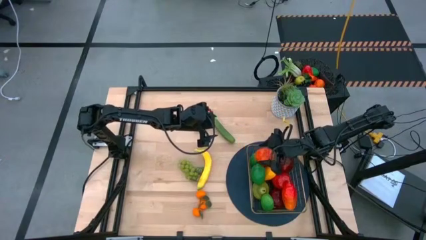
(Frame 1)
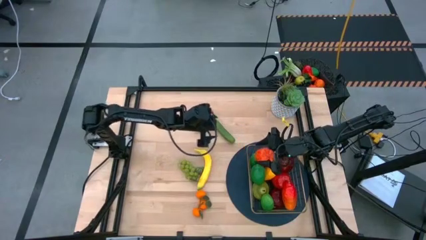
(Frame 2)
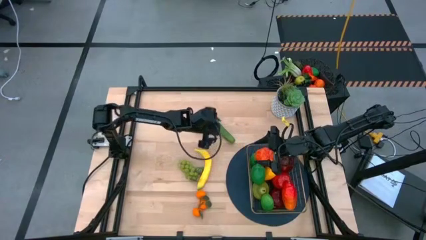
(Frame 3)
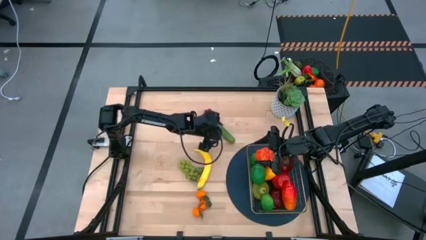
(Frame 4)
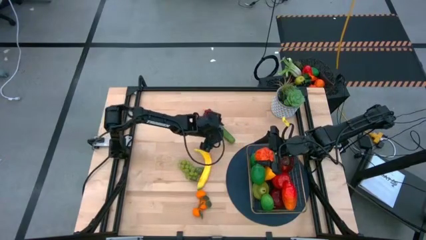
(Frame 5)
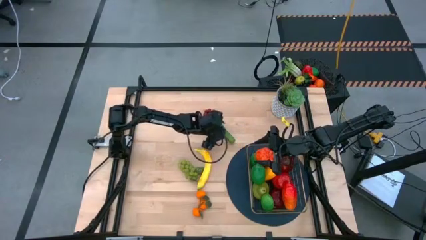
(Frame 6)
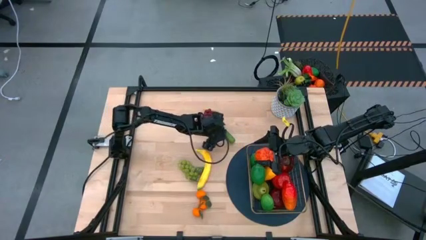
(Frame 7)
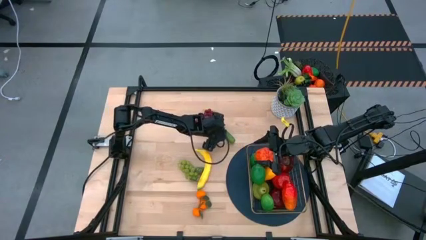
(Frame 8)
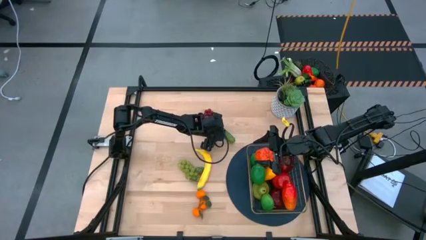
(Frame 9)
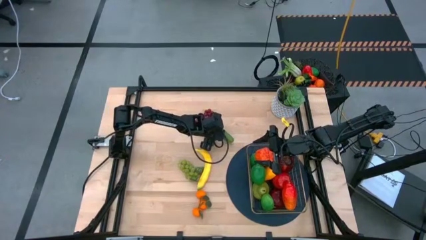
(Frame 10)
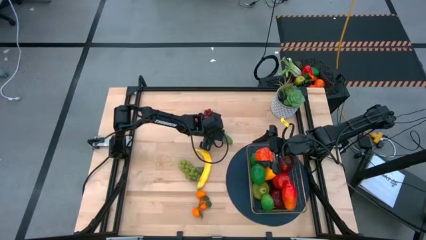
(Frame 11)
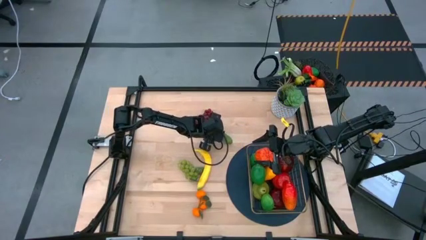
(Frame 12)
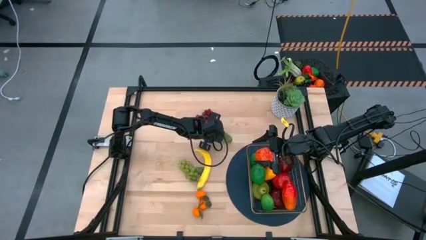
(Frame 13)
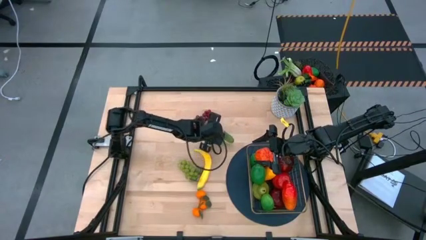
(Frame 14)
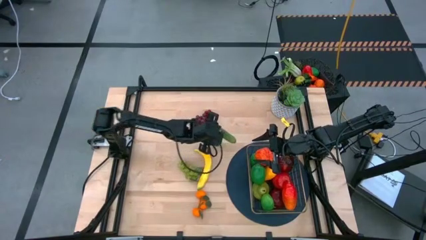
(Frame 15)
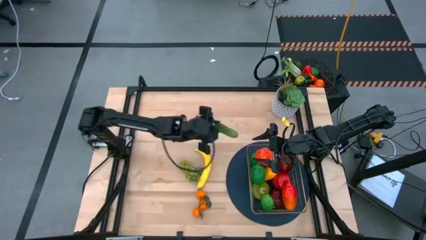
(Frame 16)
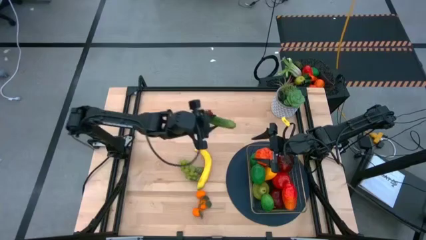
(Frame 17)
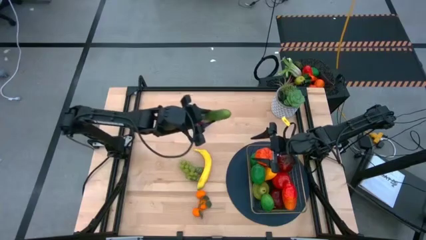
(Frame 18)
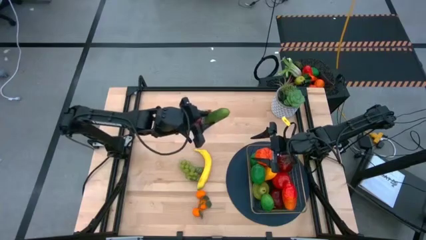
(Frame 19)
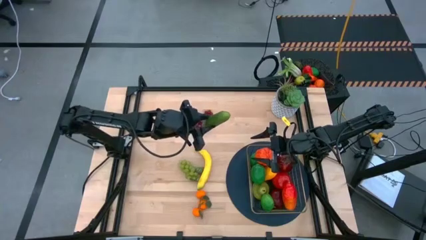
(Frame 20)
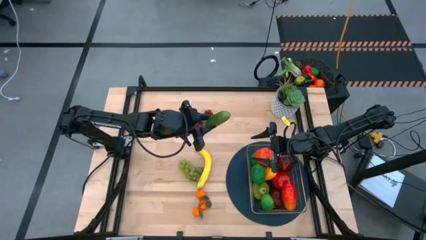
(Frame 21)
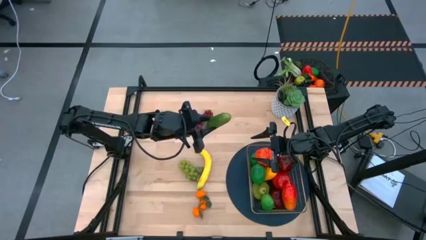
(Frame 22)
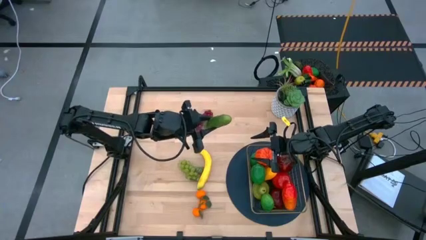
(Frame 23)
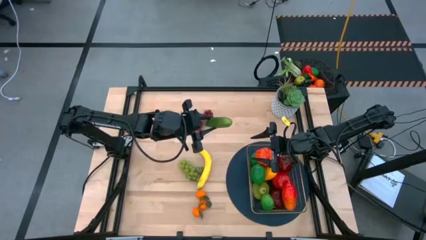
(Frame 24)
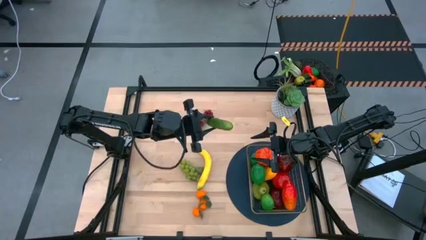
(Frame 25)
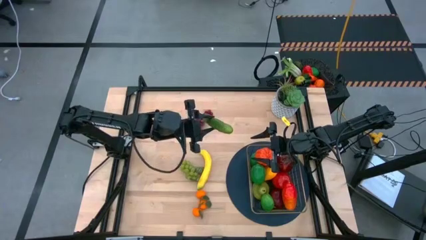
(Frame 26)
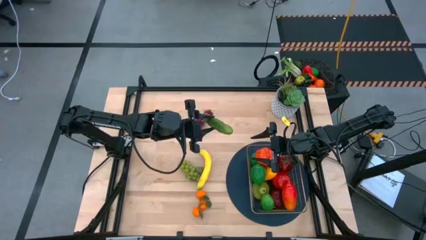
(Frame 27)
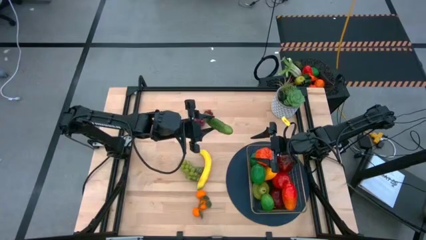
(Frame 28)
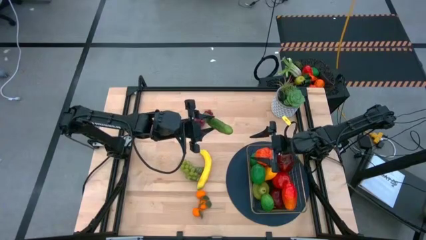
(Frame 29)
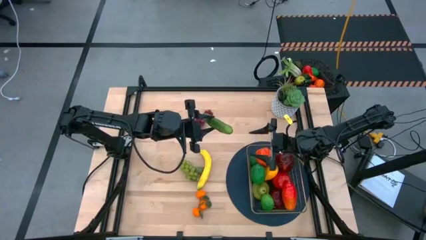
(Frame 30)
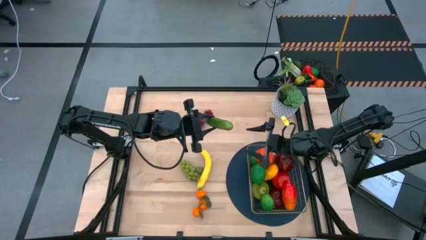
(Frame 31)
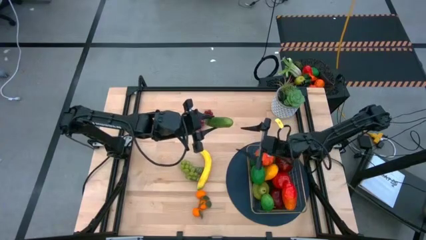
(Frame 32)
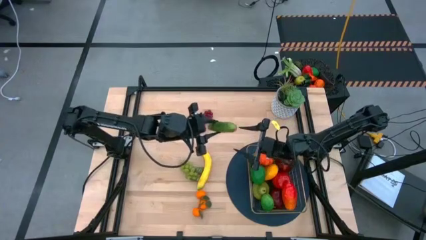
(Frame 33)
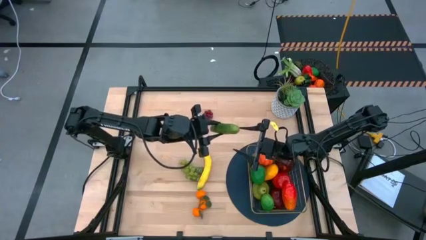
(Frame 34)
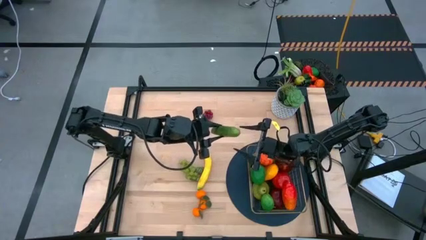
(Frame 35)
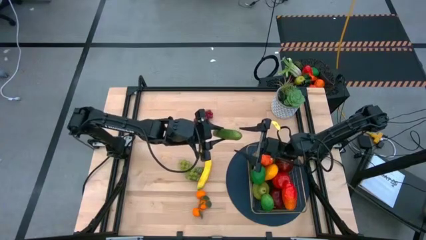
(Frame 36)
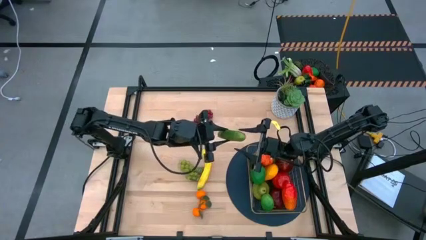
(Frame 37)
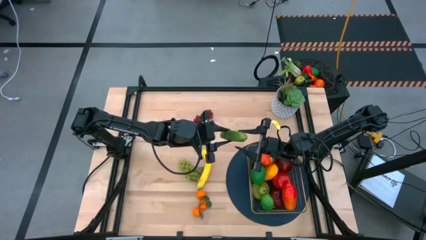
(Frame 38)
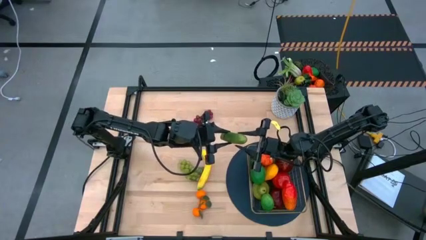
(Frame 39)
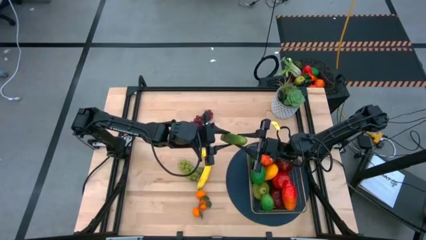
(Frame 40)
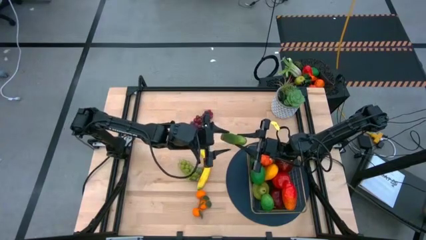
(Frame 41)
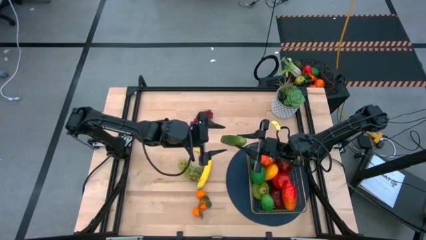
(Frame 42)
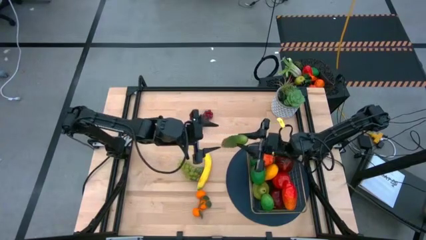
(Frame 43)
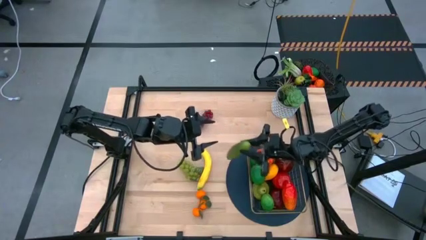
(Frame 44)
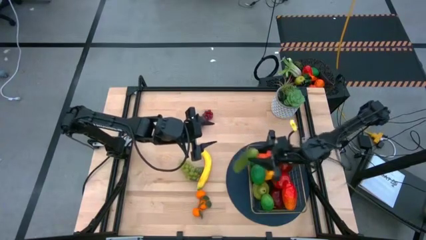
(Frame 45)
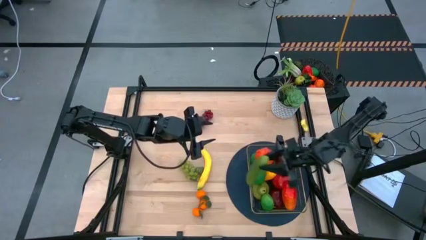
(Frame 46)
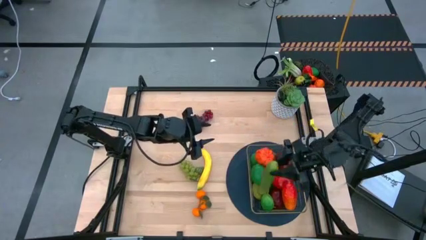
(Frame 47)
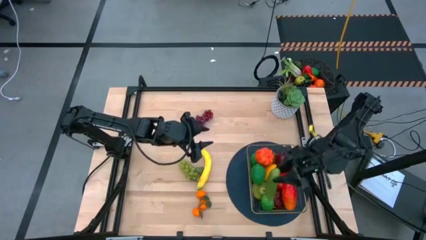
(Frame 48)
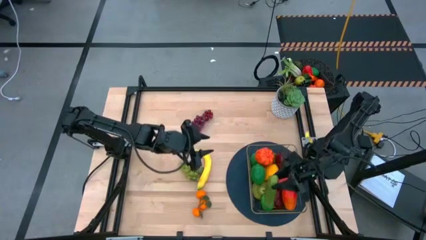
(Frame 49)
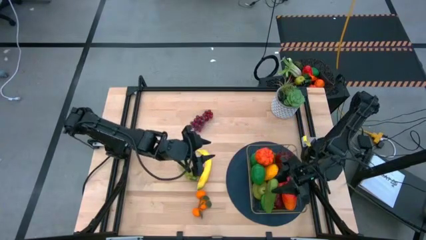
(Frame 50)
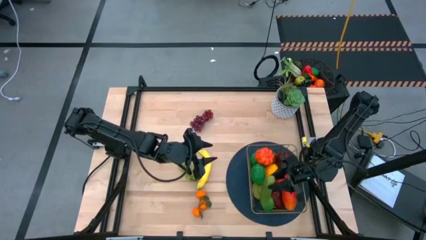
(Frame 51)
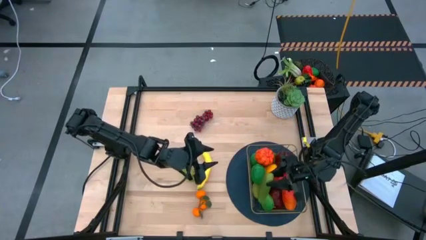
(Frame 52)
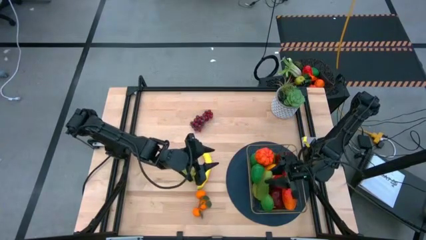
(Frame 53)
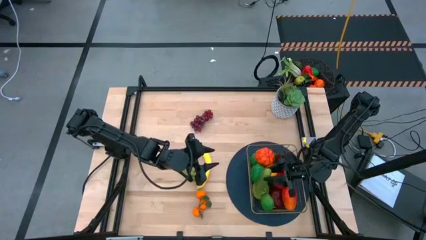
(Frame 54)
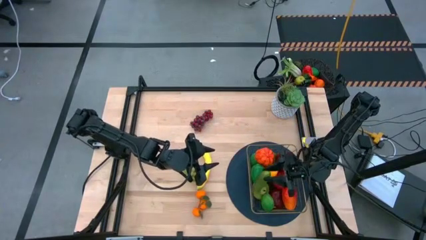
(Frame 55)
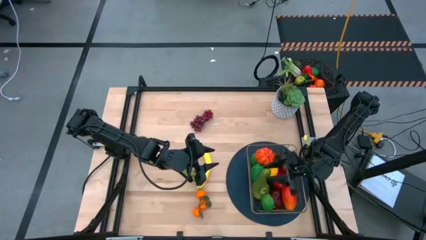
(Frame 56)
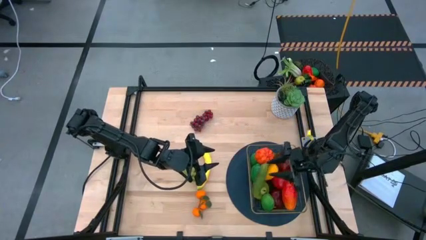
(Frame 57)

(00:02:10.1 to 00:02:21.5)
Task: Build produce basket
Put the cucumber into the wire basket

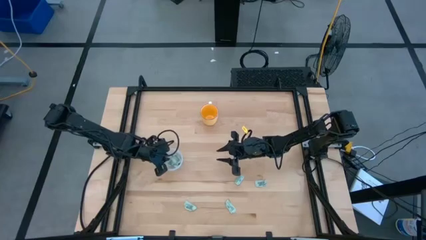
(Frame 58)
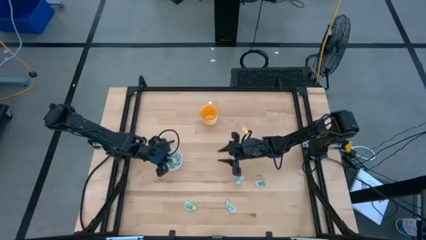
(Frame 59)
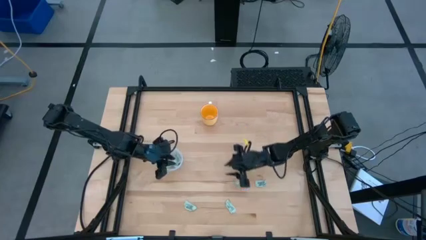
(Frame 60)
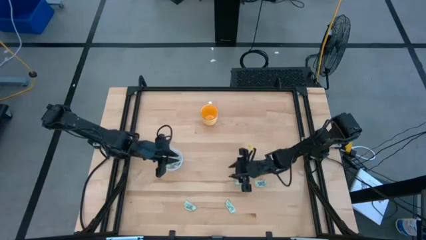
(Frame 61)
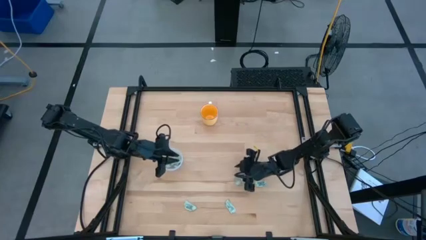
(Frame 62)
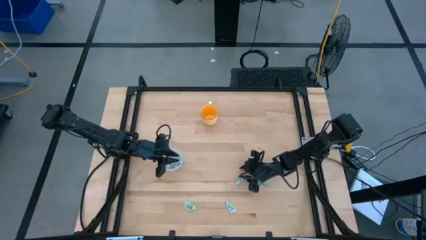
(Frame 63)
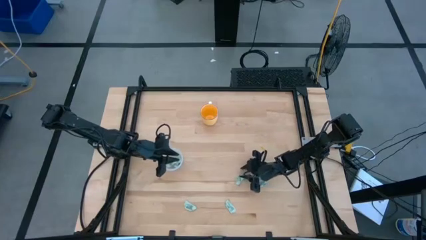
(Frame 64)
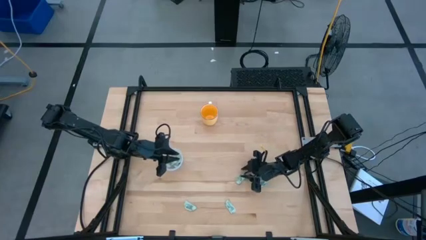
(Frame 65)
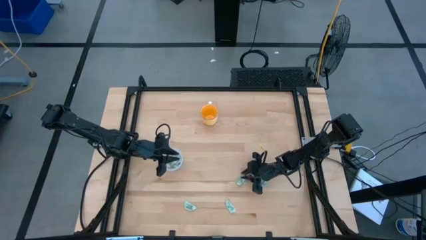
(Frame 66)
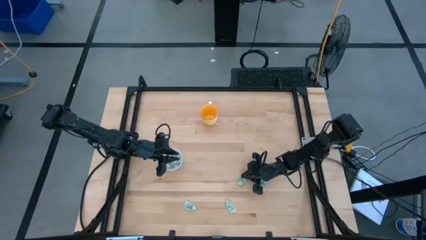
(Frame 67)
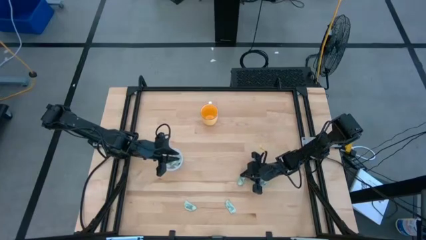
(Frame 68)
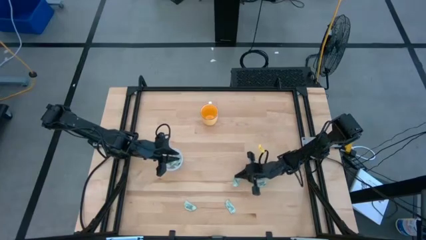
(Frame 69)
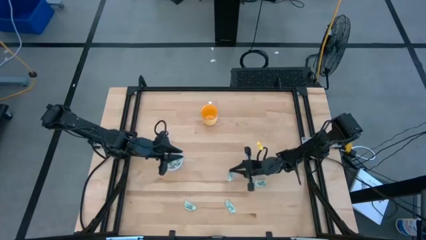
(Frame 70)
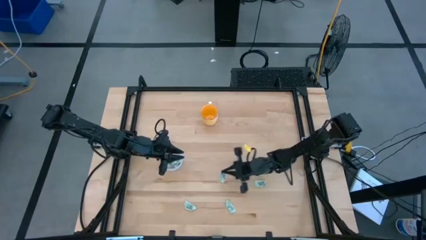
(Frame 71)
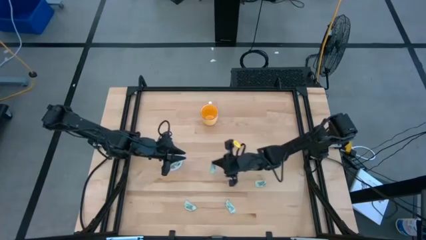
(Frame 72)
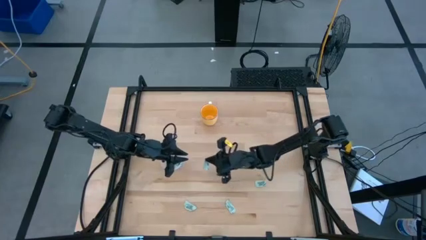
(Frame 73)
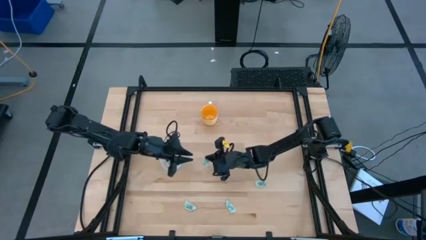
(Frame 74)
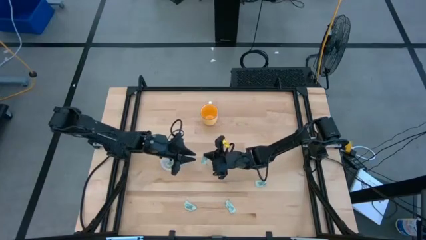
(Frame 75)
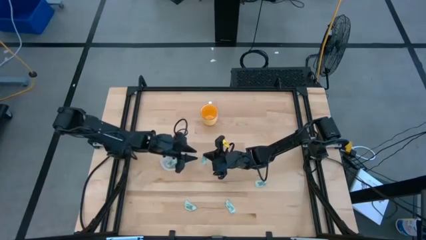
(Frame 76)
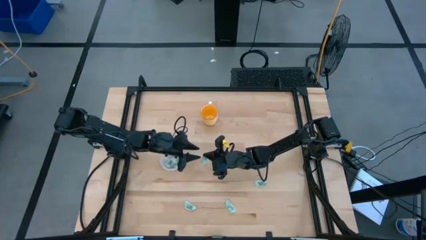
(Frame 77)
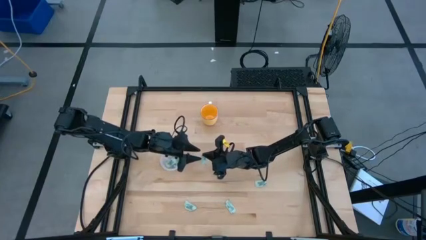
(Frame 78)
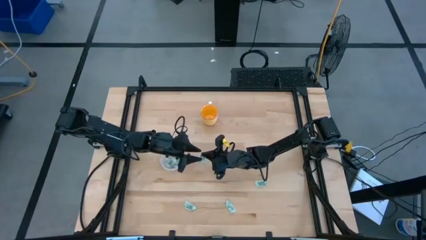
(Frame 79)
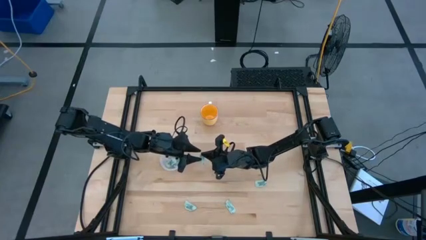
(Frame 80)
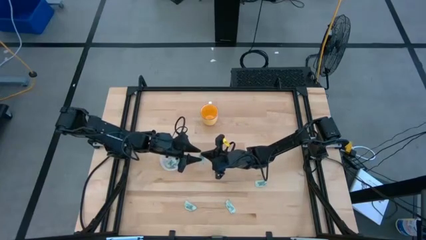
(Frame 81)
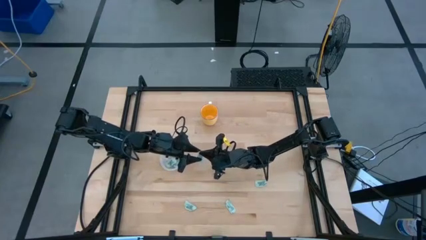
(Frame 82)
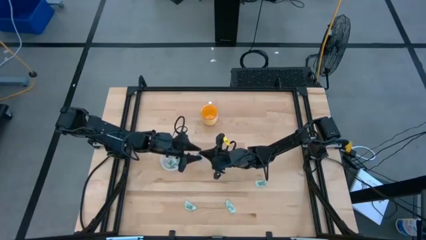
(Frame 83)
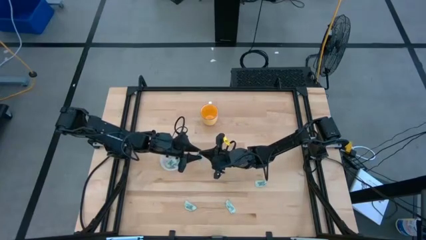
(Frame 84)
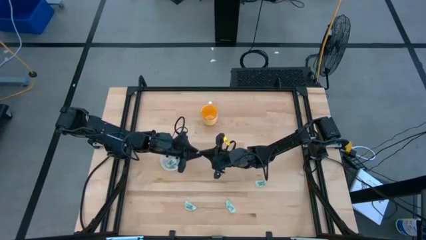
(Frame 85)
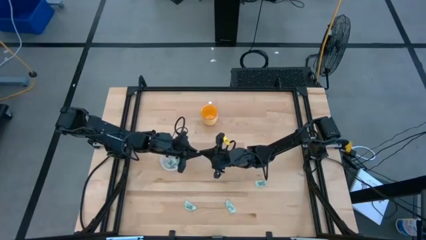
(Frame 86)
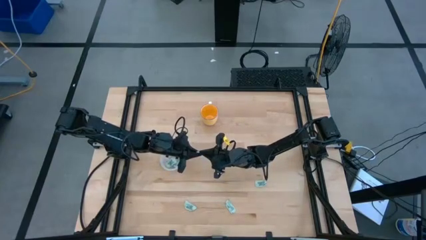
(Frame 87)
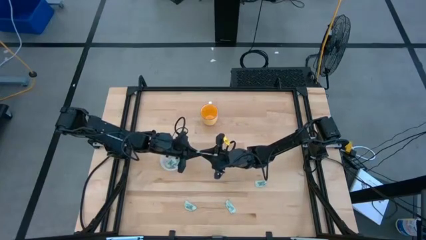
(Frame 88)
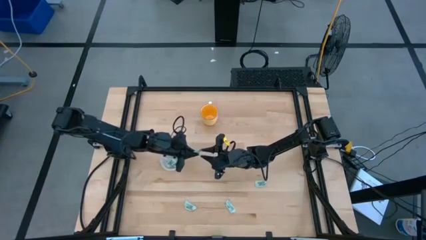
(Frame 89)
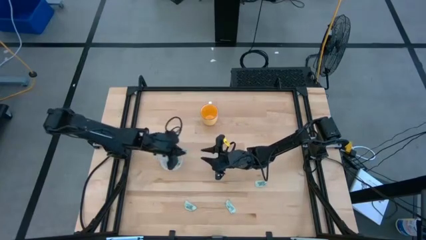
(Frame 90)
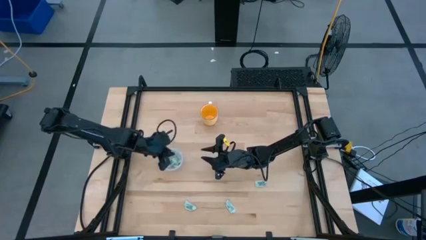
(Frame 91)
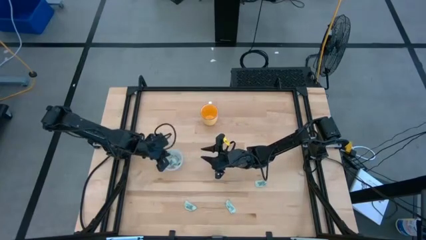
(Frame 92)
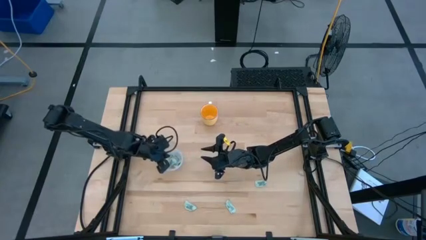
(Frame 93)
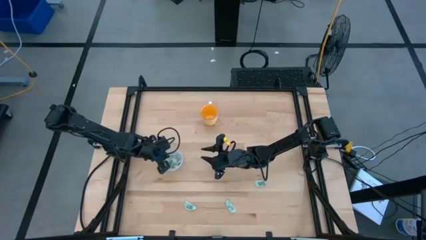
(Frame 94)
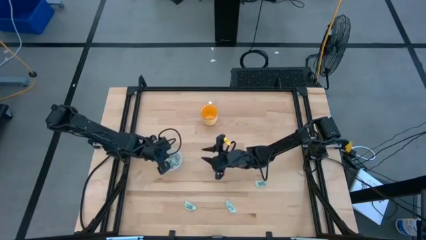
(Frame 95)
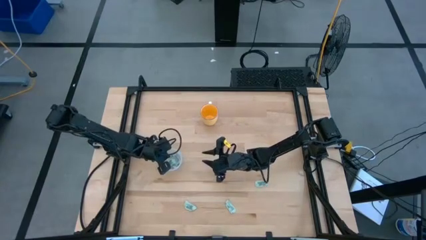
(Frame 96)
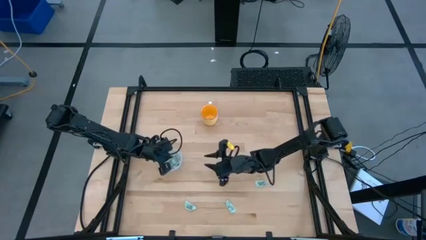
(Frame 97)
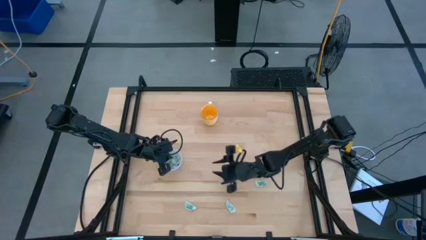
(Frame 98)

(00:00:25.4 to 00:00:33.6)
Task: Pick and place Stevia / Truvia into bins
Put the stevia packet into the container
